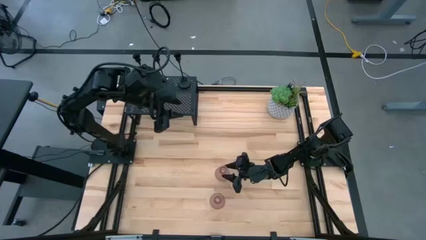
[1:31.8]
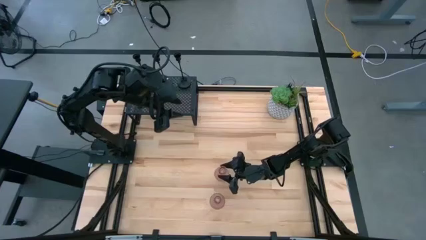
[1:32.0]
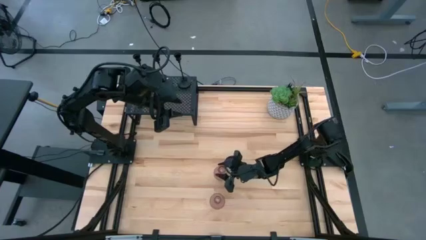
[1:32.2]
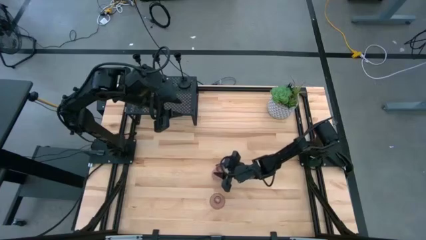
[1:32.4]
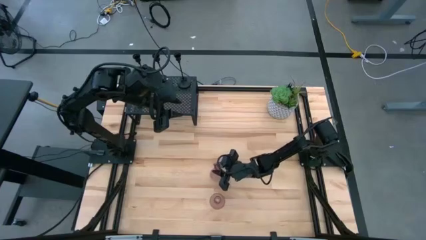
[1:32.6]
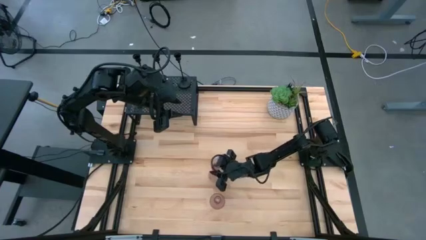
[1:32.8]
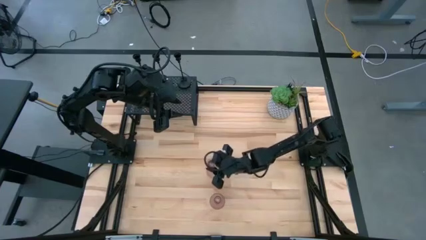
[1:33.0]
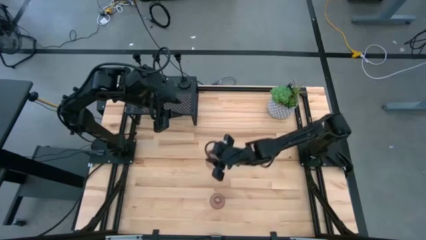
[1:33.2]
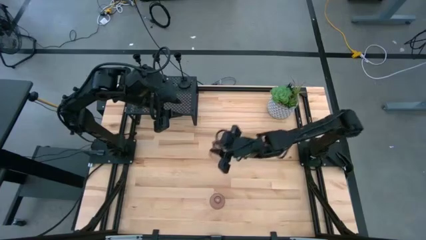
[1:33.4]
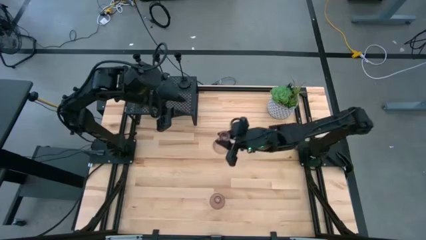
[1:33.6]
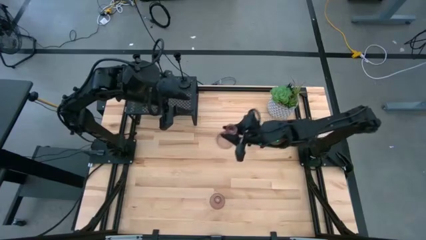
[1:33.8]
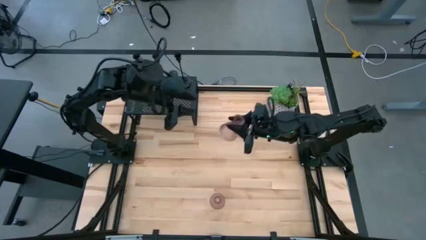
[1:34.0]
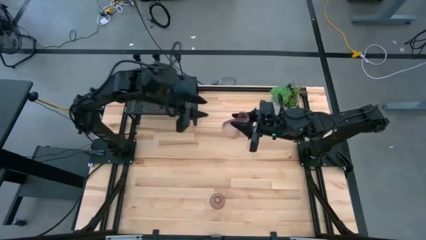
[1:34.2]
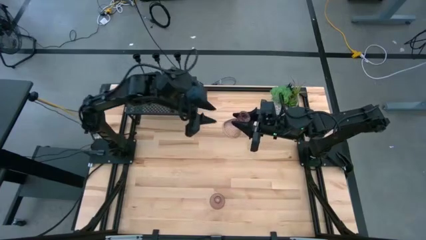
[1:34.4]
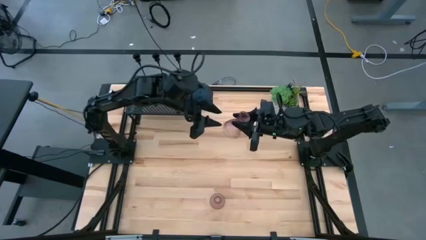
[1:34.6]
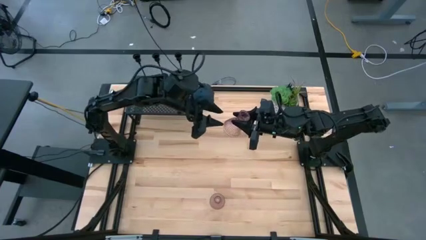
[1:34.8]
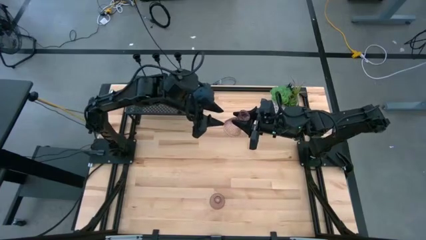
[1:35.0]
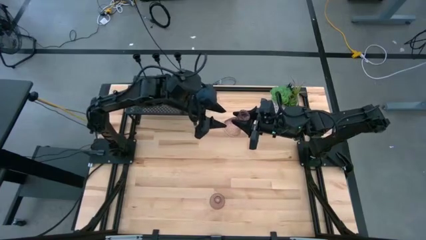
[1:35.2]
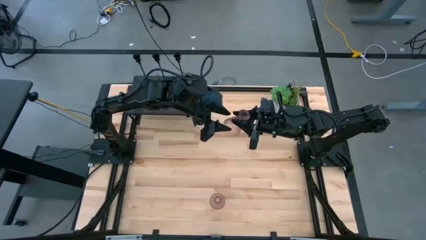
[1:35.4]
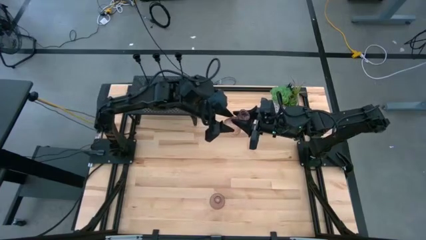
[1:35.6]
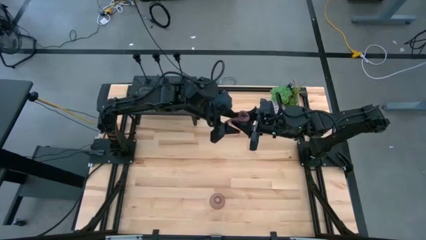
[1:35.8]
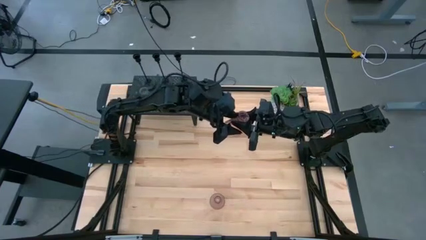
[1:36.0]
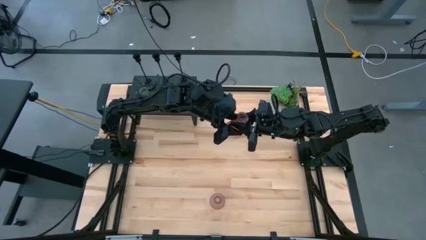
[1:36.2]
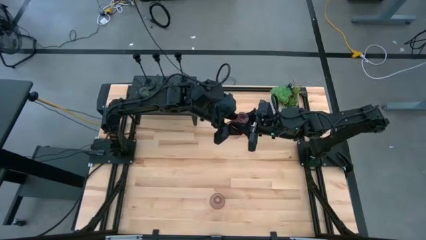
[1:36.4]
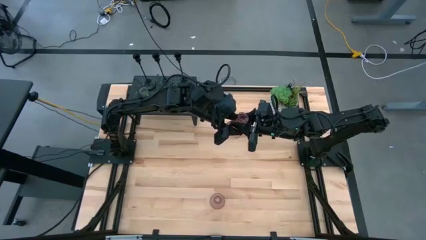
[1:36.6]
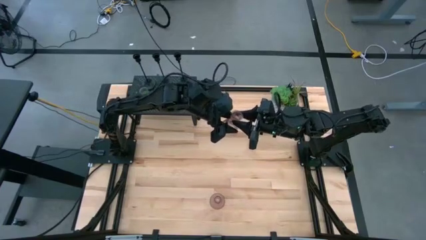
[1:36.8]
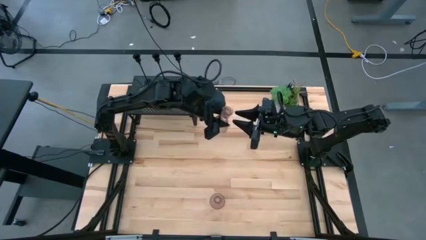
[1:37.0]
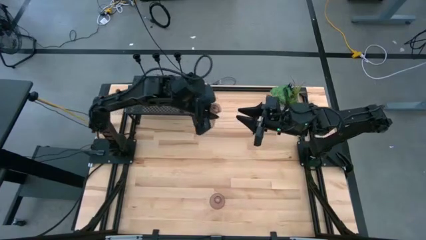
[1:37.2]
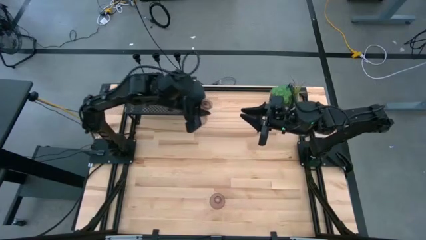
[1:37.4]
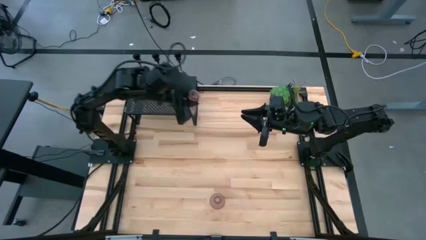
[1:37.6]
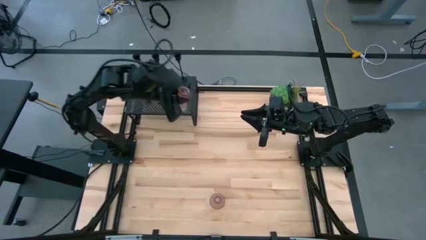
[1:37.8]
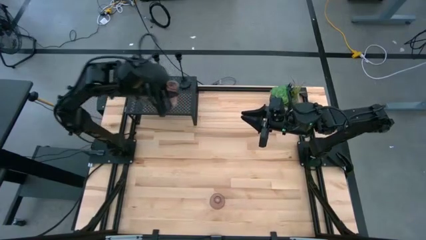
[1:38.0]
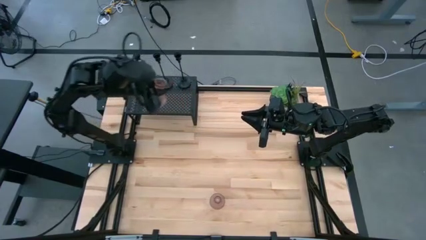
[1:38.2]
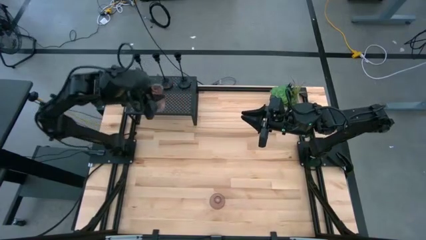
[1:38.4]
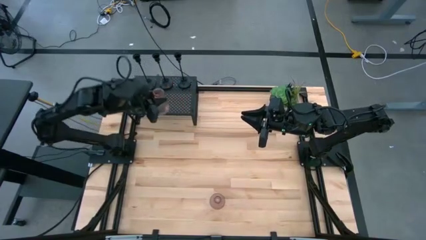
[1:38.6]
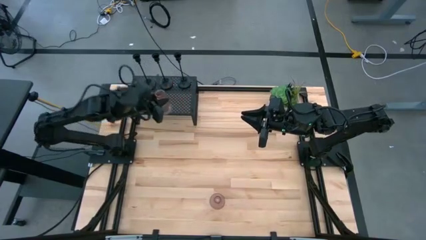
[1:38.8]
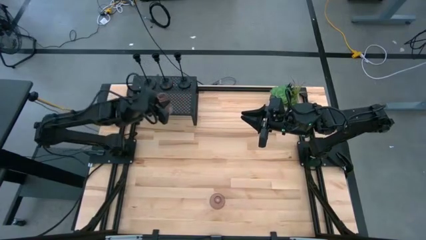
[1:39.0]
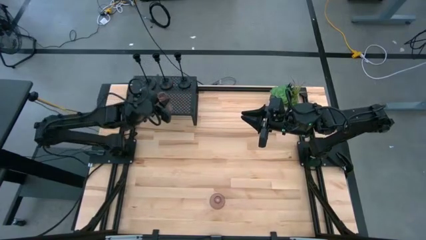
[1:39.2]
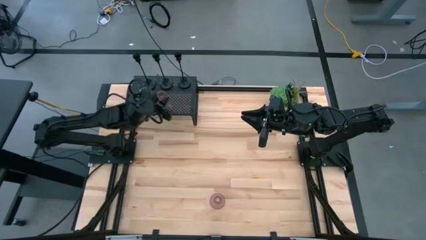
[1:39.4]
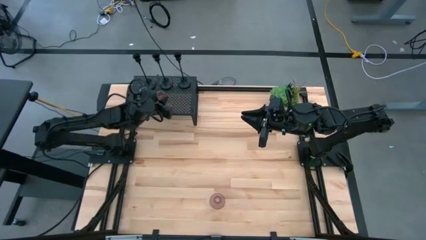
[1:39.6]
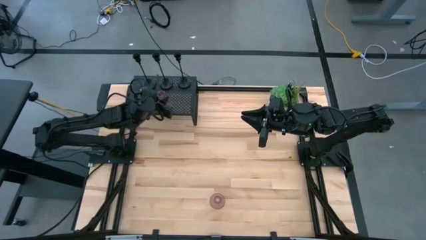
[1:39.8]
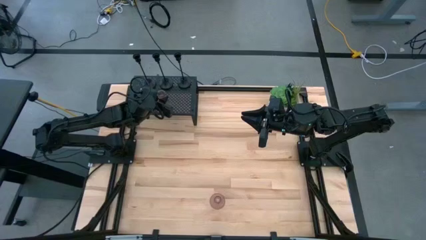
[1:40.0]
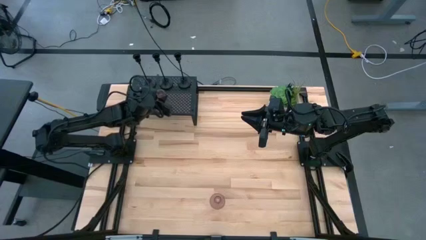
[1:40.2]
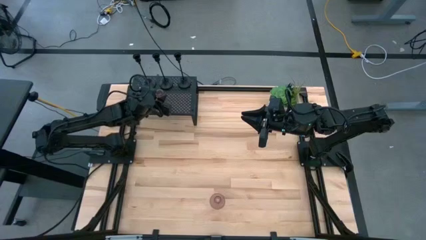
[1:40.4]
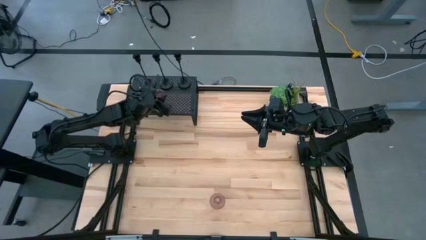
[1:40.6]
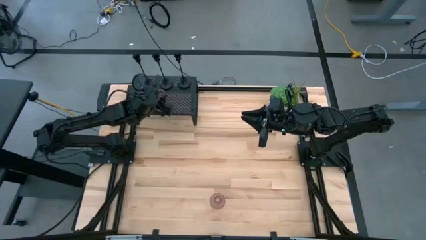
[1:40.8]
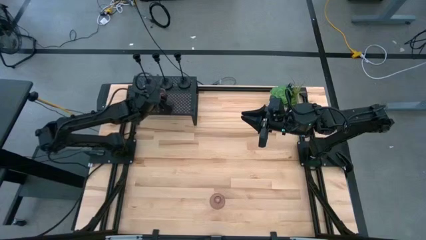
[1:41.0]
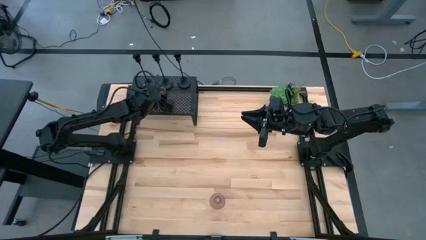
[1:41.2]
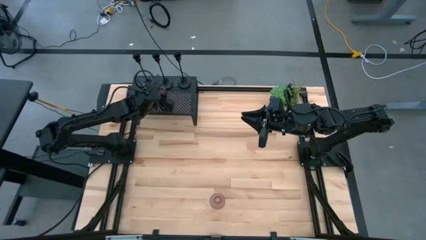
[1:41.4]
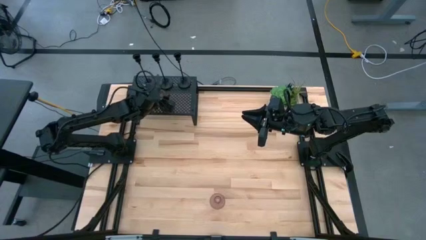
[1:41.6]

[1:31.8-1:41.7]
Task: Pick & Place candle stick holders
Put the right pink glass candle holder on the shelf

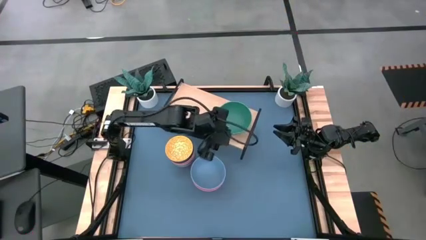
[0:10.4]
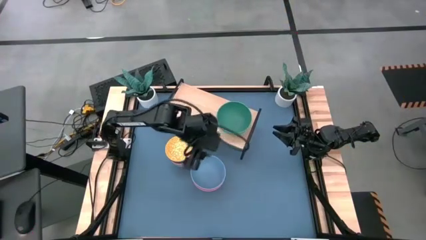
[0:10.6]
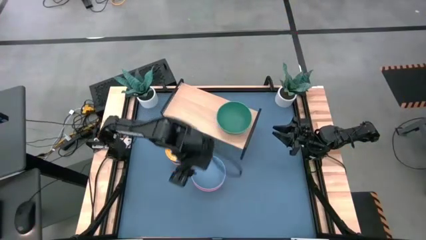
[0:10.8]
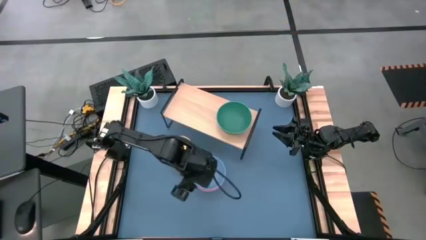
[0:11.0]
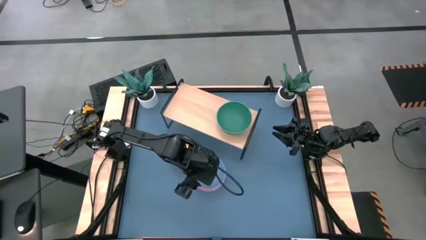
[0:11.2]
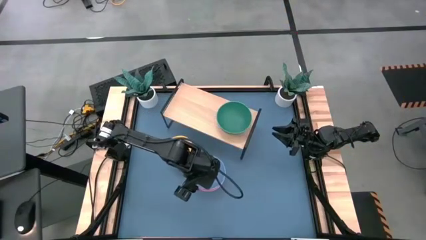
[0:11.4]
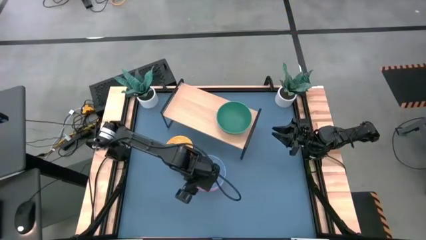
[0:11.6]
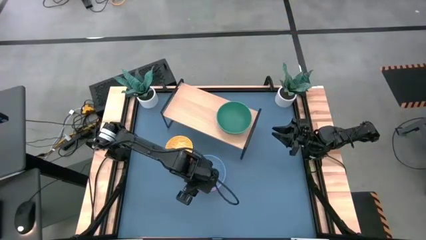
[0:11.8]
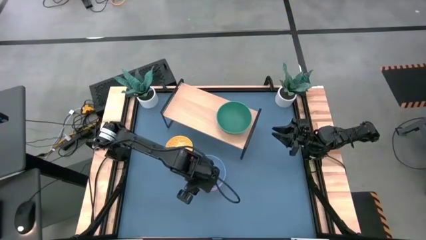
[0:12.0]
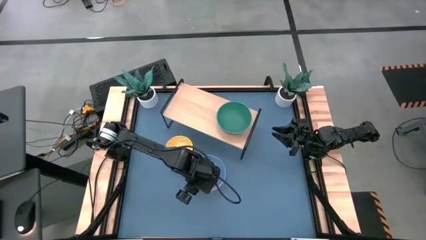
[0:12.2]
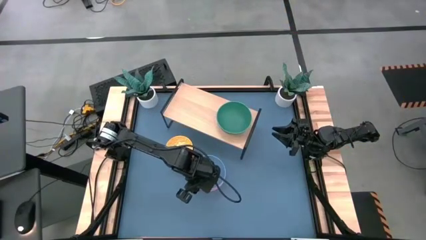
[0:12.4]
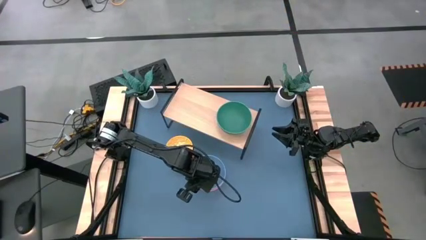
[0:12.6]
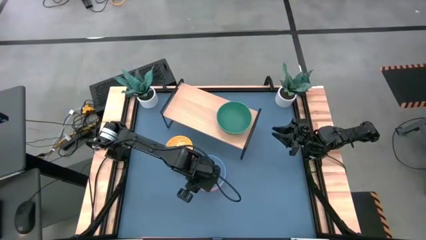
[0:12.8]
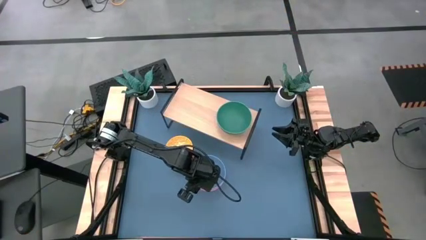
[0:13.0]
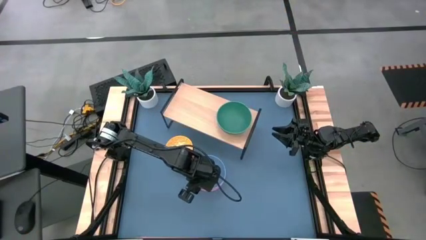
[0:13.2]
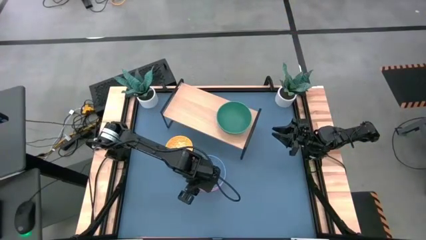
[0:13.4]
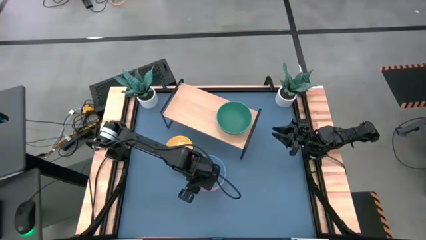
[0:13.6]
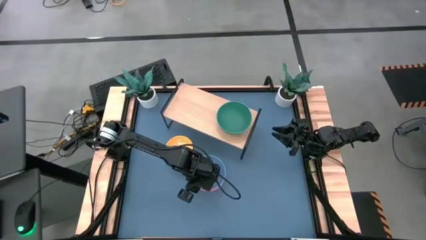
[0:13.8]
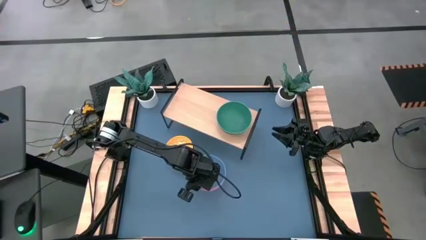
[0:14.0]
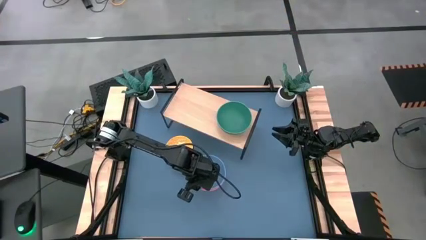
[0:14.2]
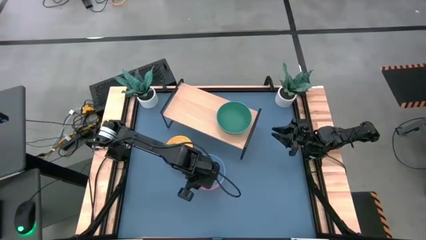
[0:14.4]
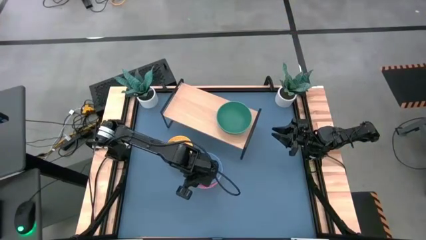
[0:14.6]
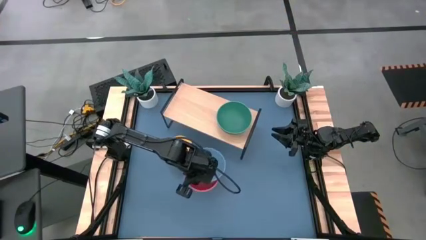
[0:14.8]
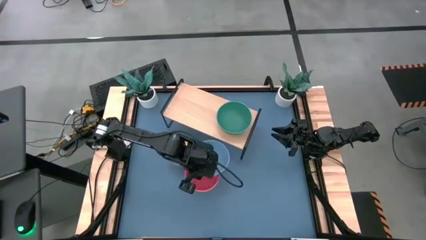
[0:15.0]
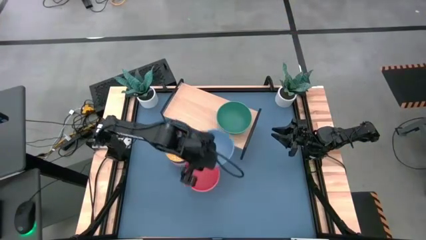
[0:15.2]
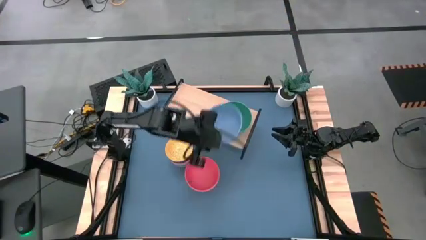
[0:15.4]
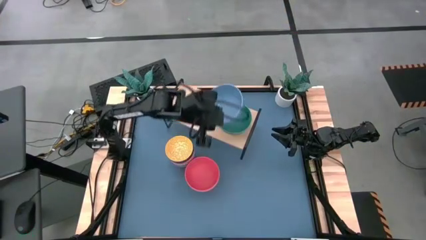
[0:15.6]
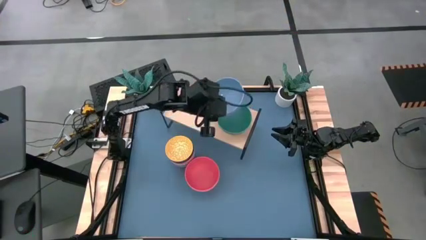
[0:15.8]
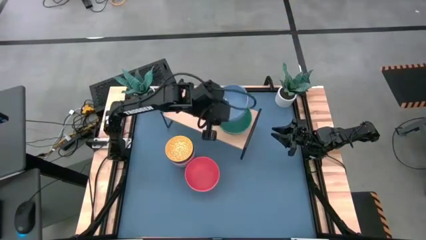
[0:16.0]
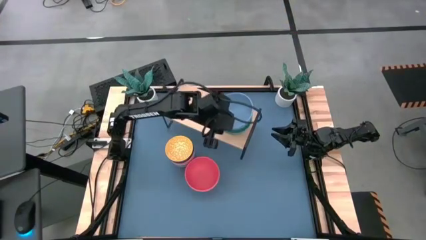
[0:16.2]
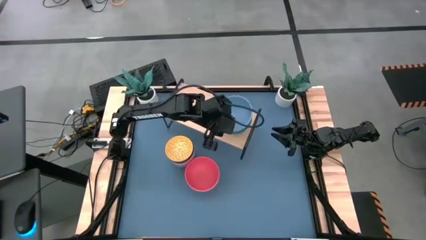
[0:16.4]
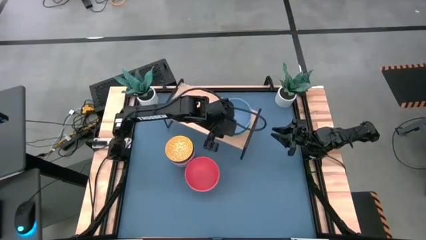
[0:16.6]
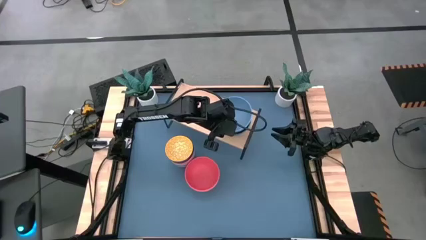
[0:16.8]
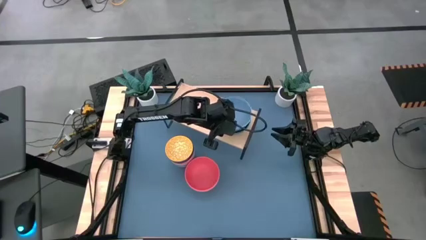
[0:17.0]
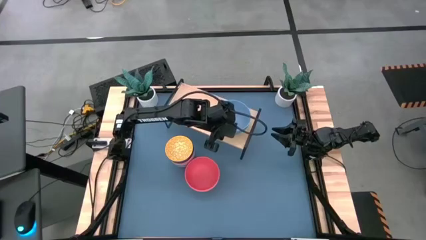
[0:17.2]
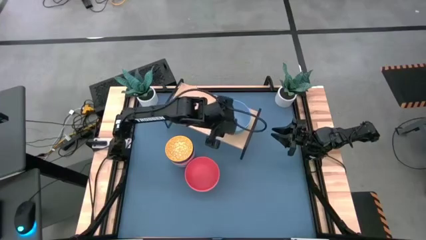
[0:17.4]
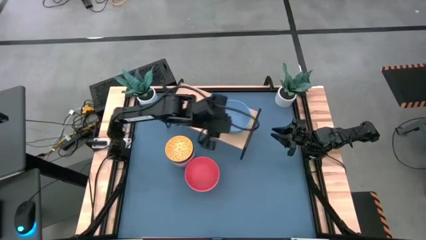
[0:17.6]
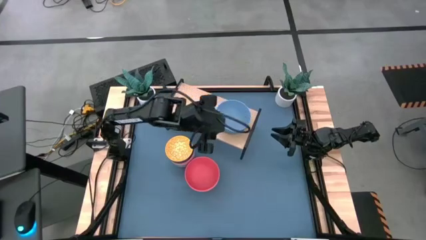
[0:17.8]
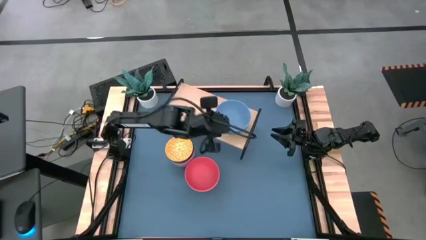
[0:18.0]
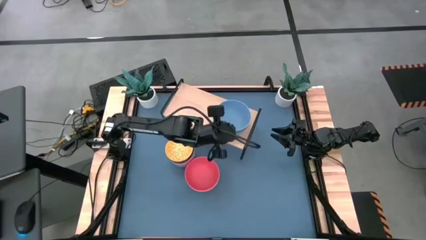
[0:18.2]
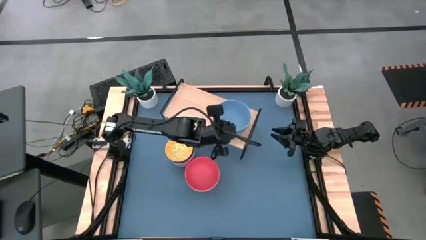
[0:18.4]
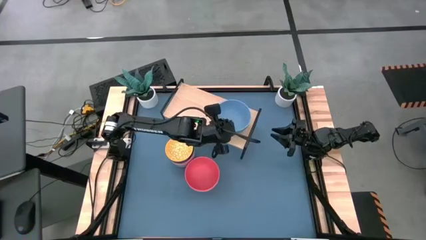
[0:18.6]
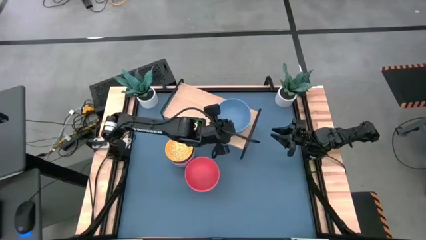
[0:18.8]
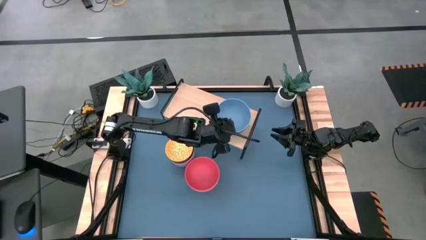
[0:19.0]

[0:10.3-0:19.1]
Task: Place and stack bowls onto a shelf
Stack the blue bowl onto the green bowl on the shelf
